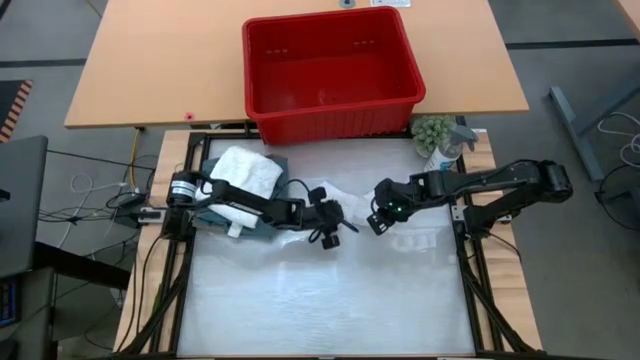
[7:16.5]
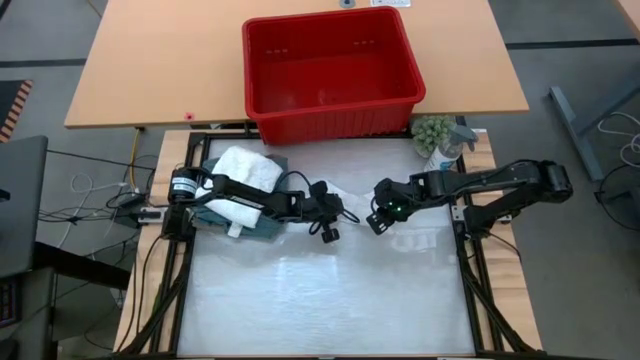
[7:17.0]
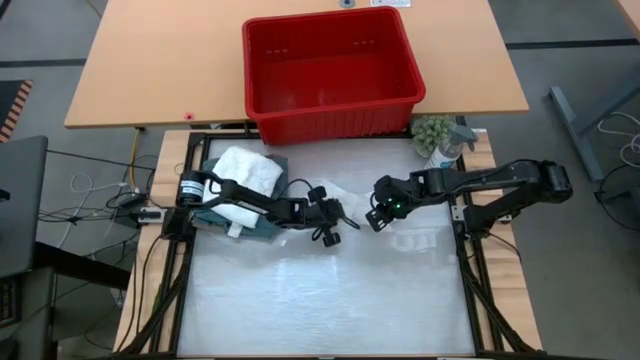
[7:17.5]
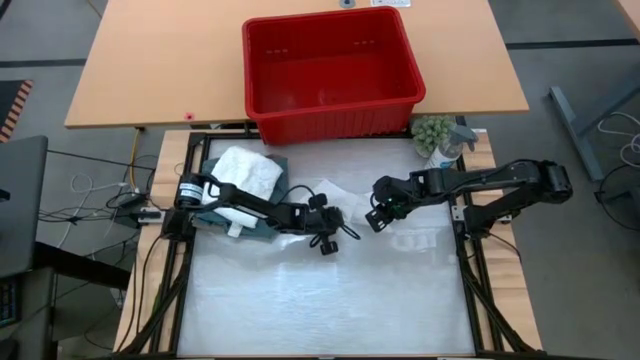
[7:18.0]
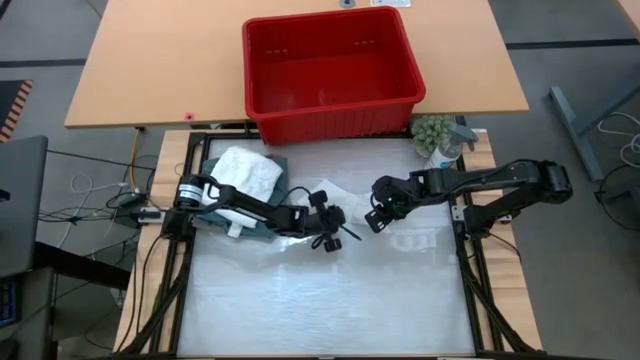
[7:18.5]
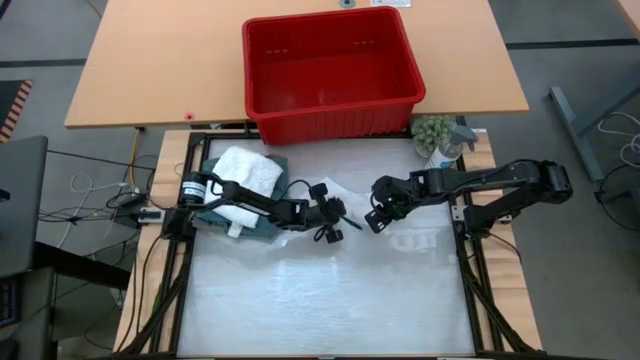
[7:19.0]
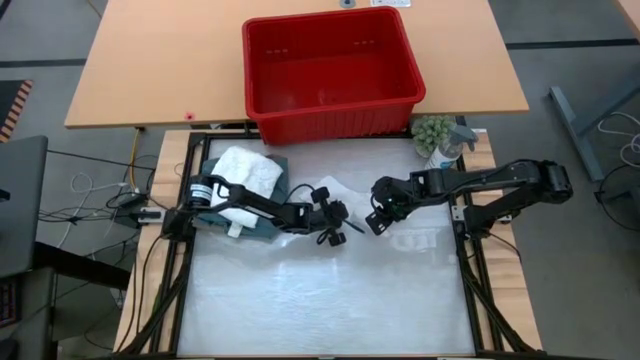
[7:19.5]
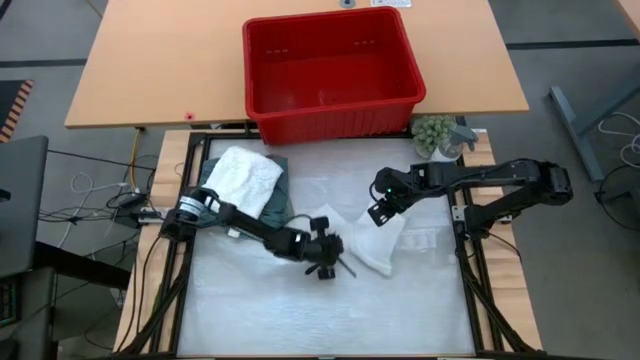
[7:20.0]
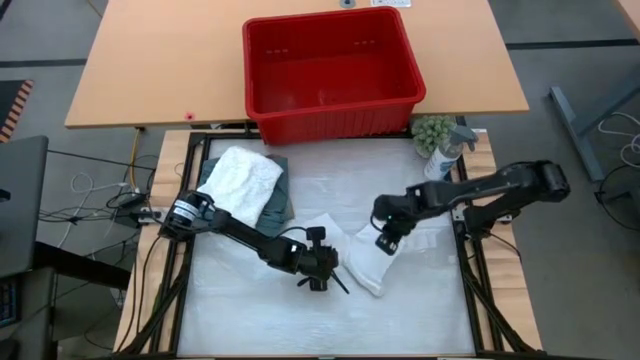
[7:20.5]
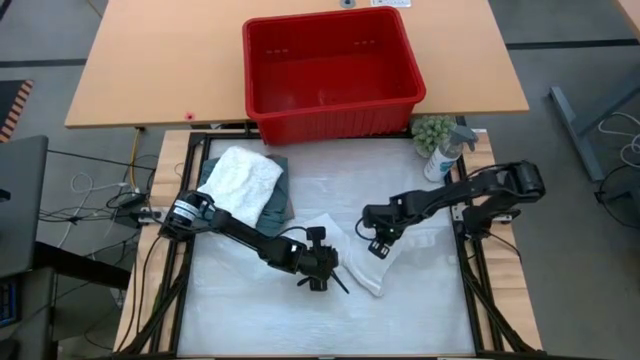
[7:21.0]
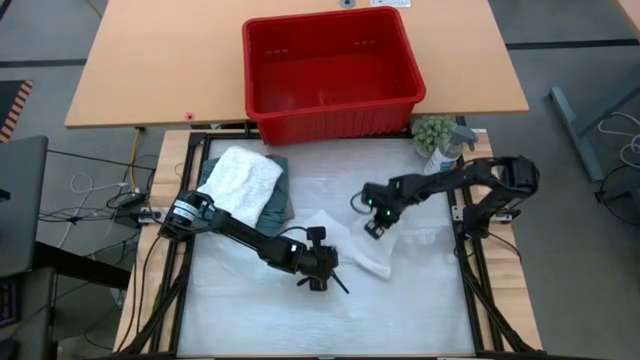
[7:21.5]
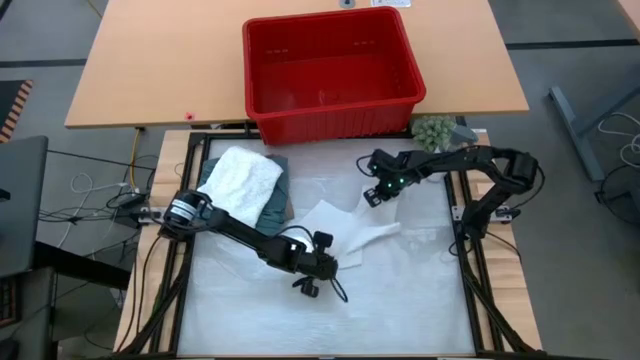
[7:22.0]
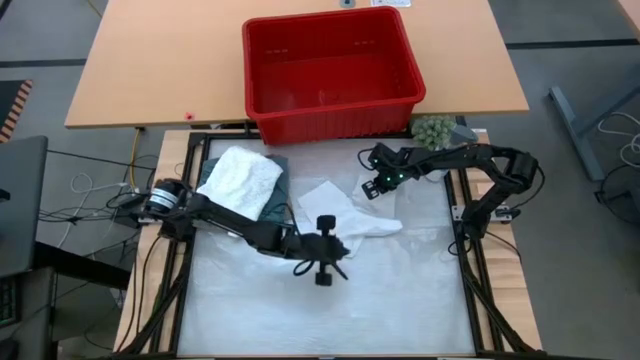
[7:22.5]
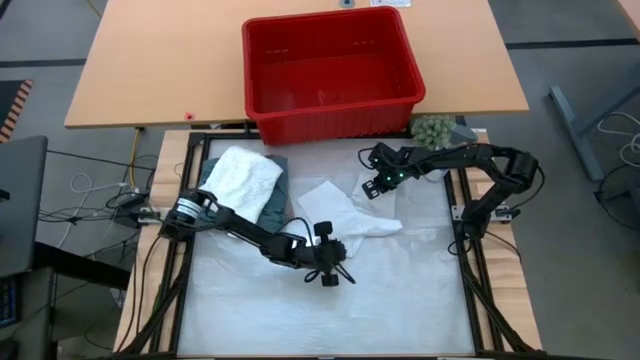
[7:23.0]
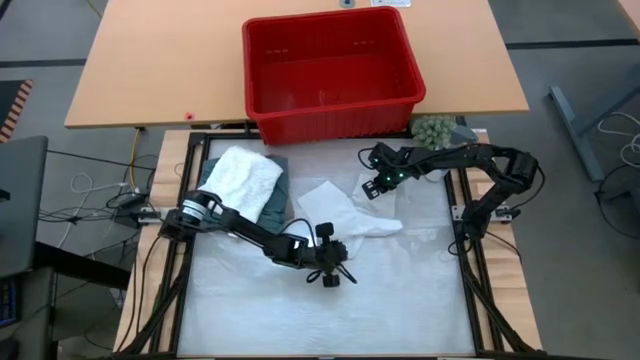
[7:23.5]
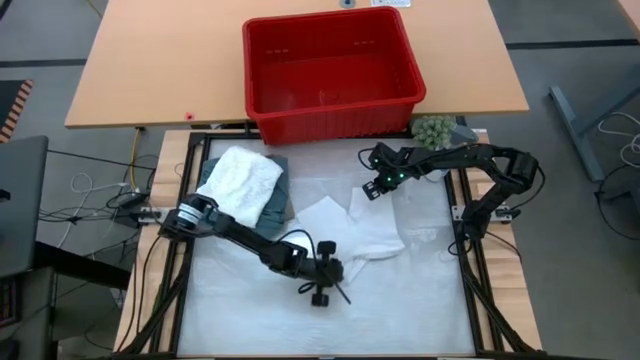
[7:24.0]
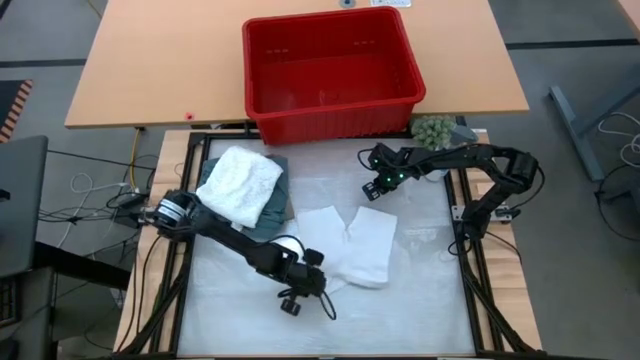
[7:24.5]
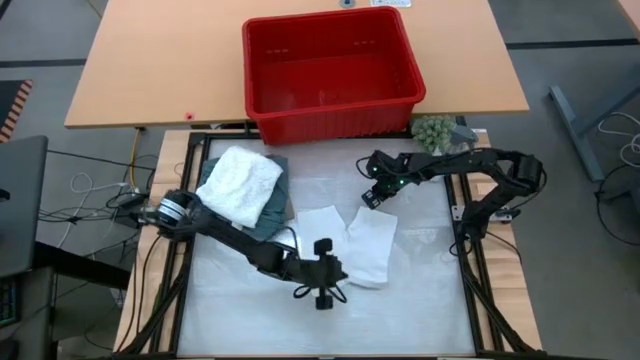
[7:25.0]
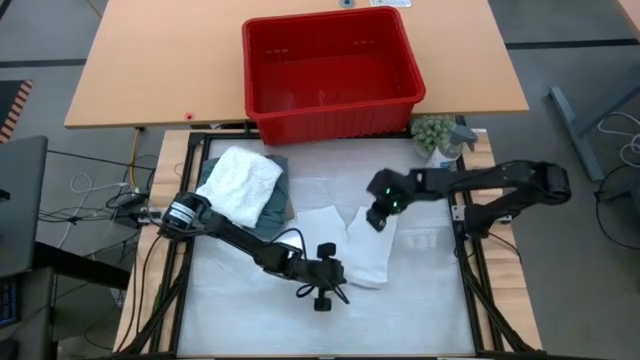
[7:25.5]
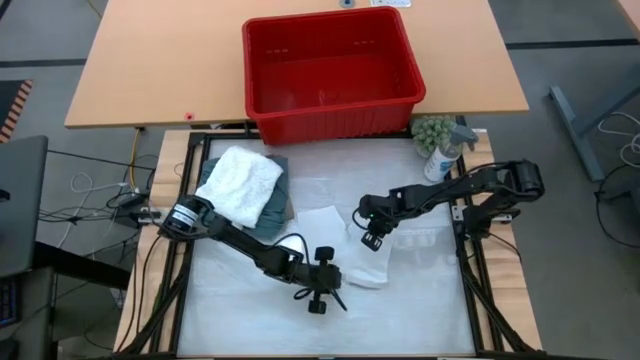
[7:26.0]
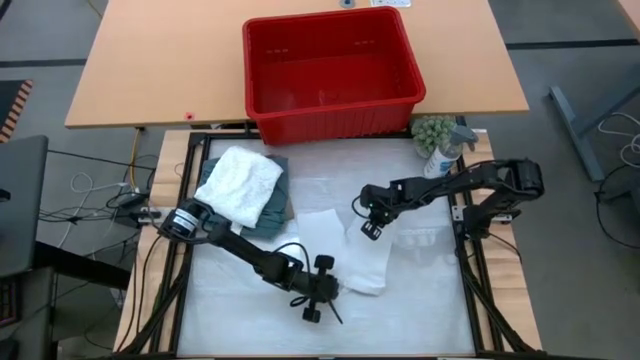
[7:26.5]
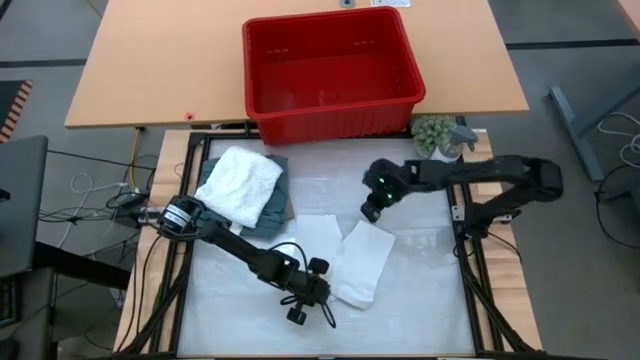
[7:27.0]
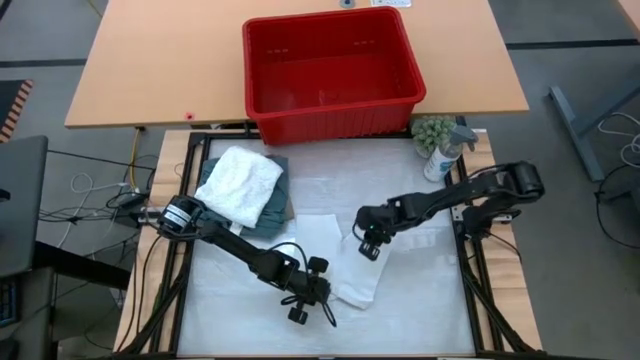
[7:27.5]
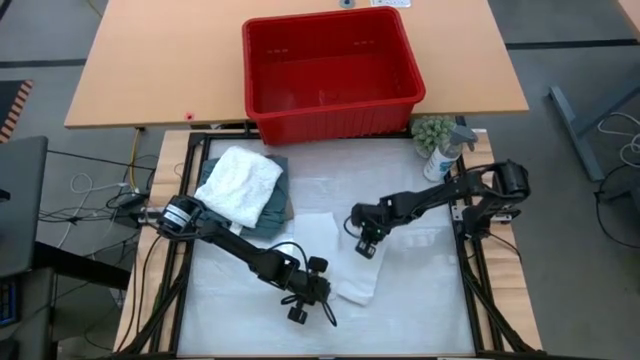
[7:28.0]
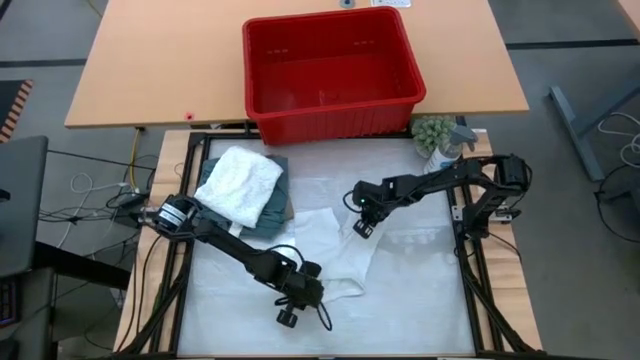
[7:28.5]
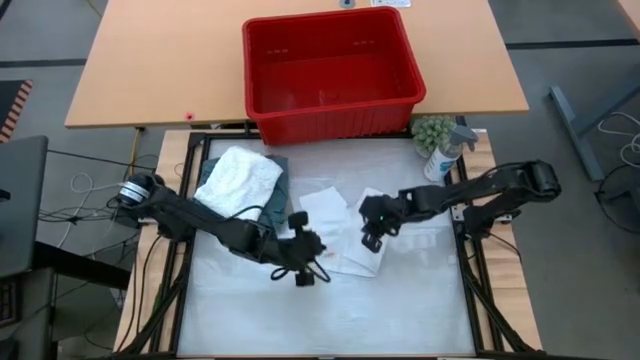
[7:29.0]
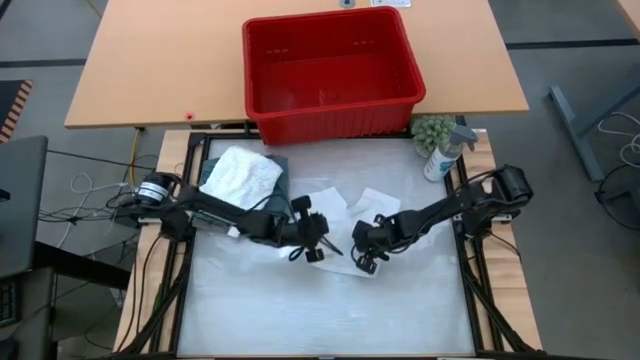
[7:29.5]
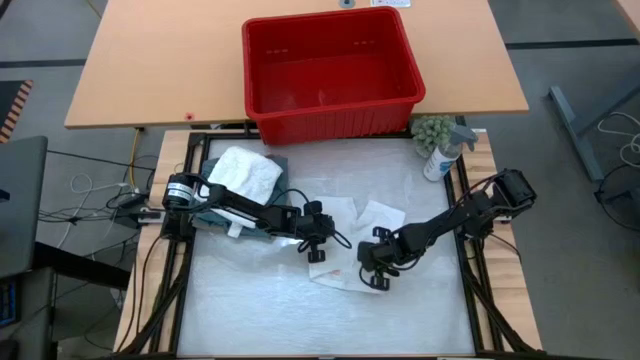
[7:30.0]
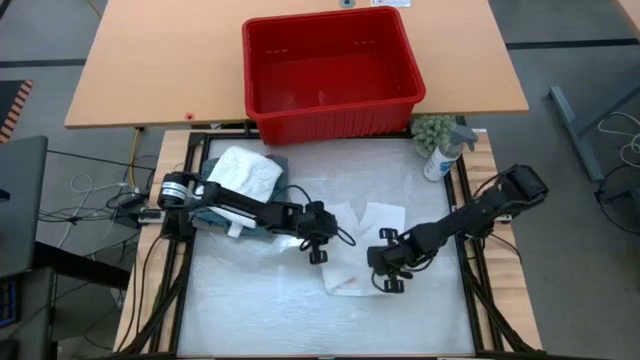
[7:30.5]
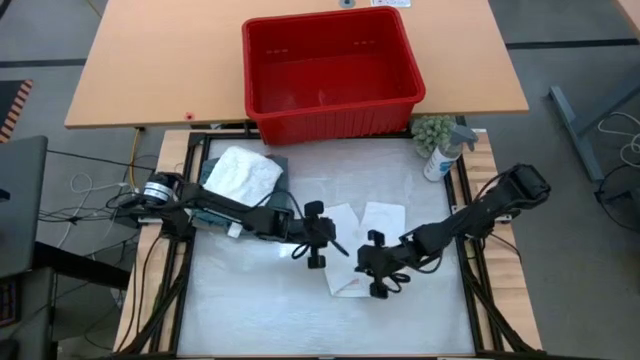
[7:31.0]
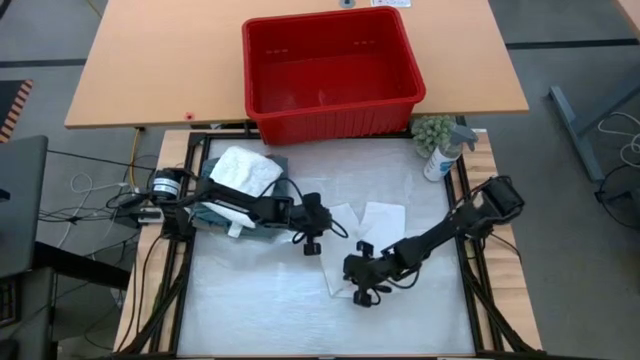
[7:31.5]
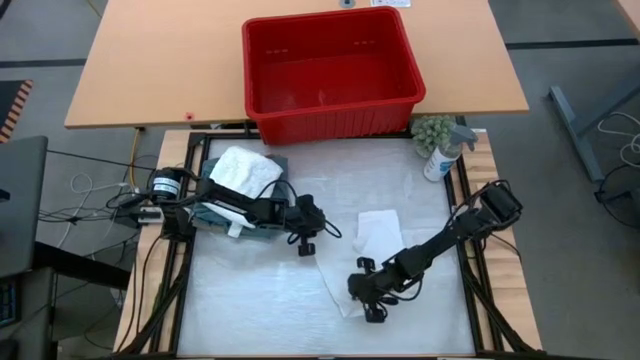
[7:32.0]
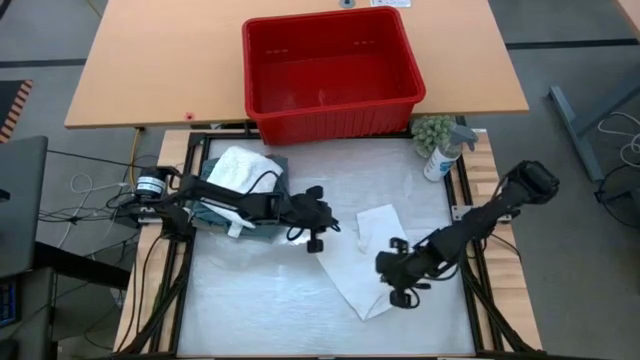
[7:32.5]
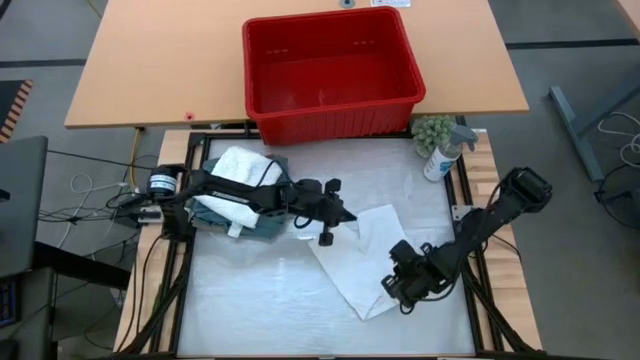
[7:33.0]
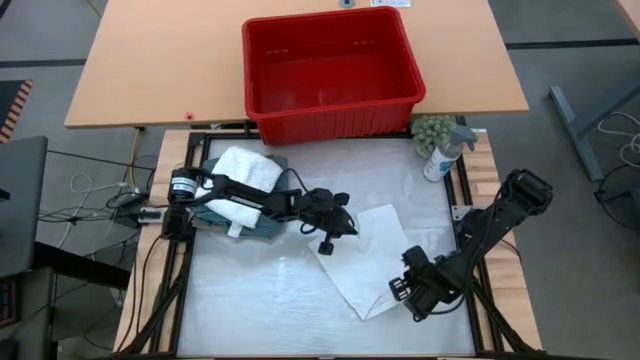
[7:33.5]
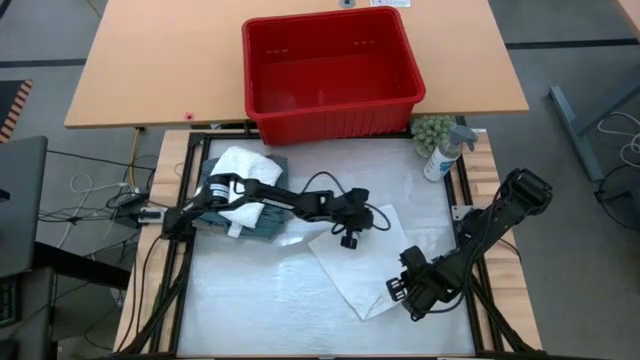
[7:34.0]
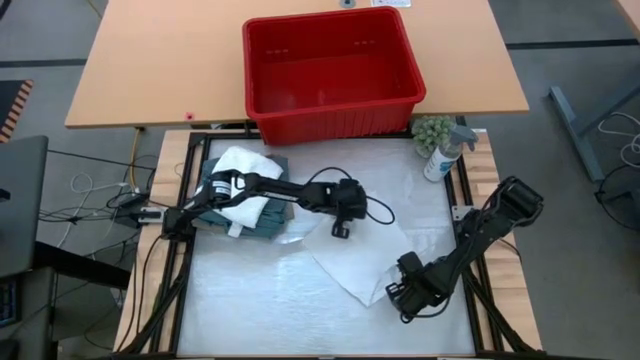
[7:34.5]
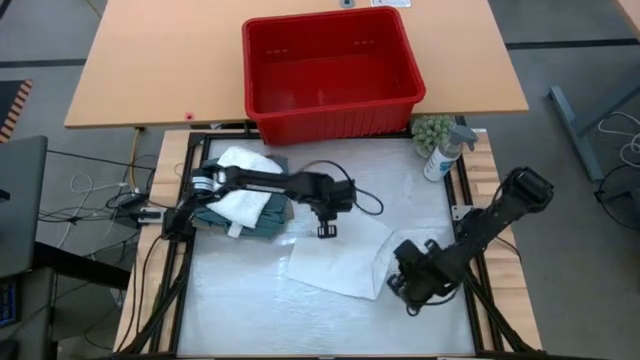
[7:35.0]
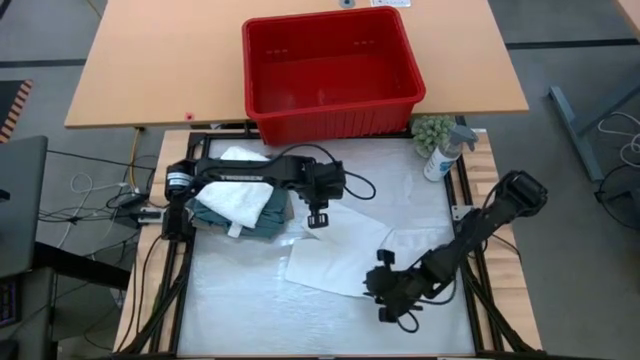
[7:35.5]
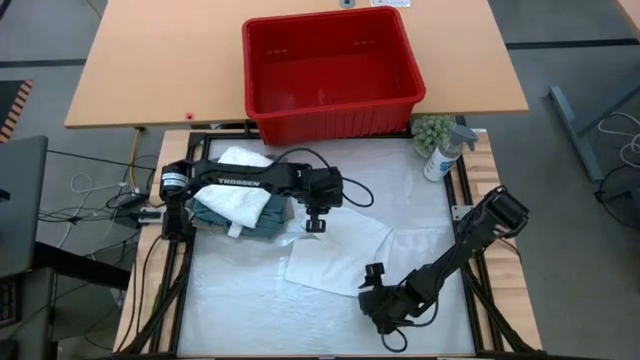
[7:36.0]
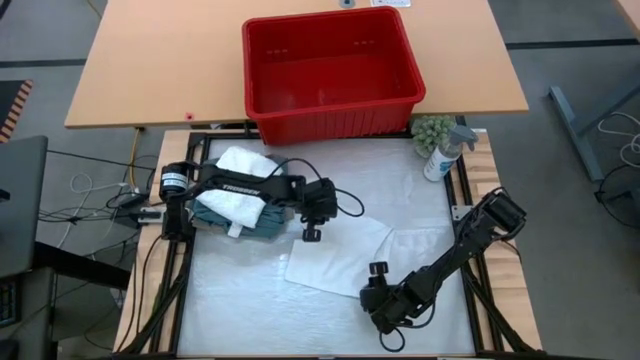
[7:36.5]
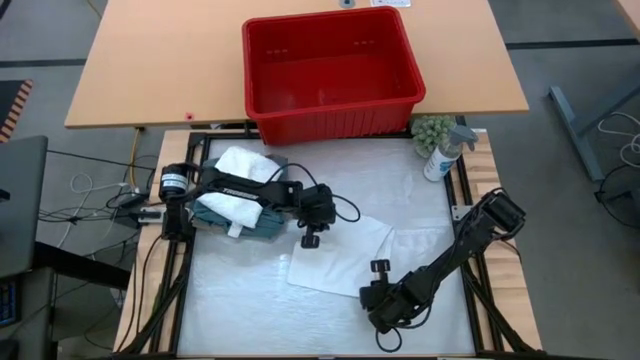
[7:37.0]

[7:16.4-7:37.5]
Task: Fold Laundry from Bin
Fold the white underwear in the red bin
